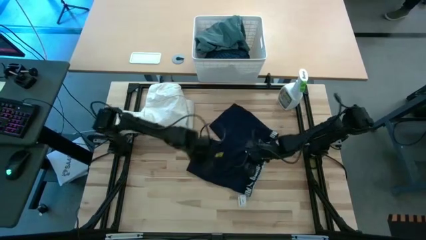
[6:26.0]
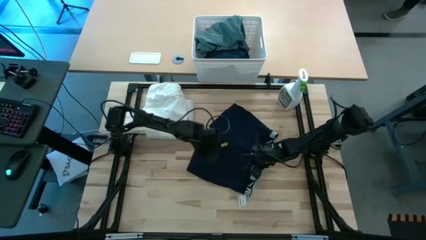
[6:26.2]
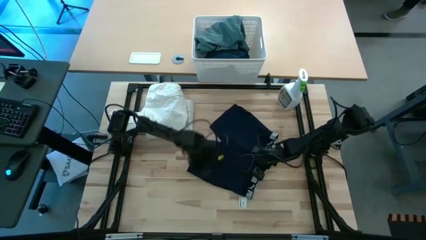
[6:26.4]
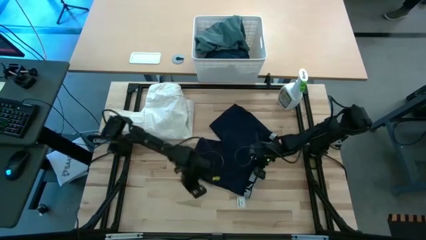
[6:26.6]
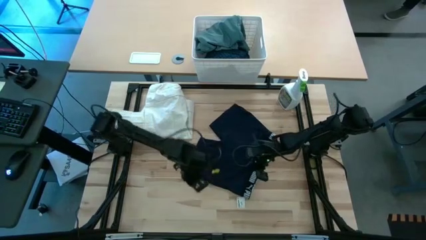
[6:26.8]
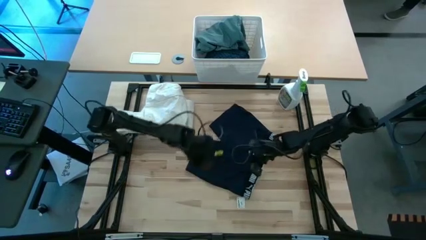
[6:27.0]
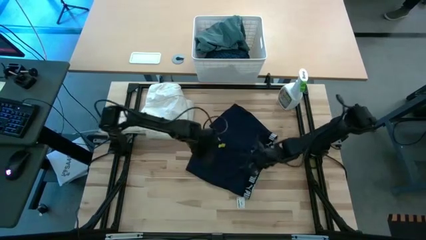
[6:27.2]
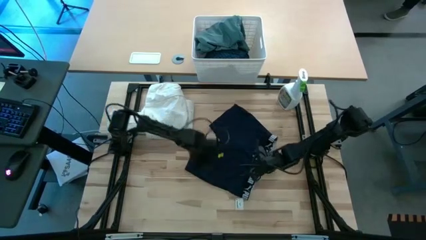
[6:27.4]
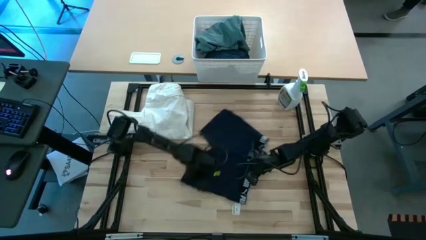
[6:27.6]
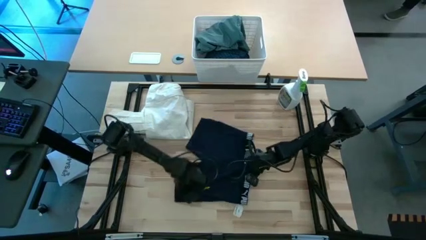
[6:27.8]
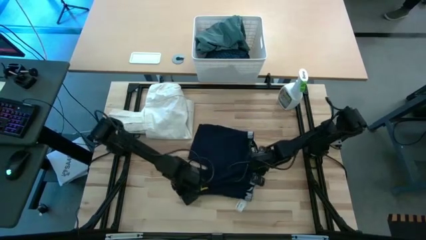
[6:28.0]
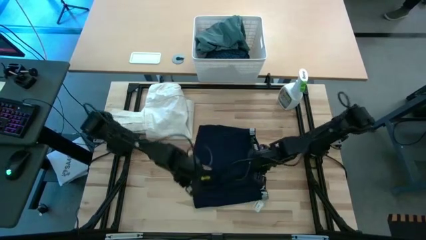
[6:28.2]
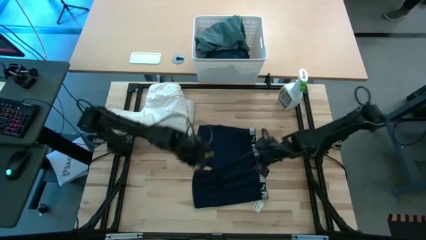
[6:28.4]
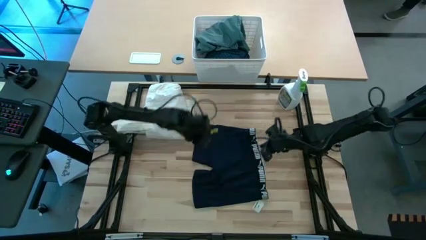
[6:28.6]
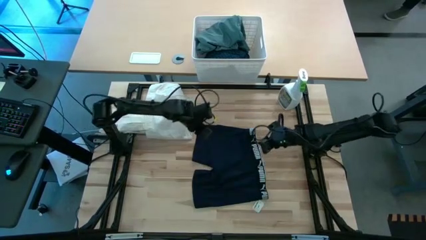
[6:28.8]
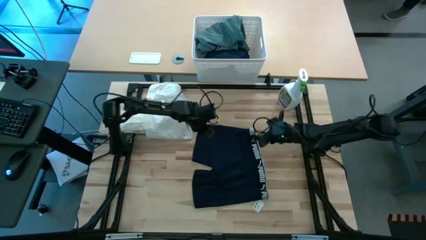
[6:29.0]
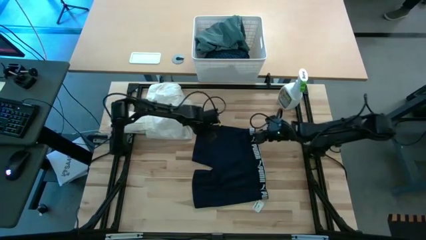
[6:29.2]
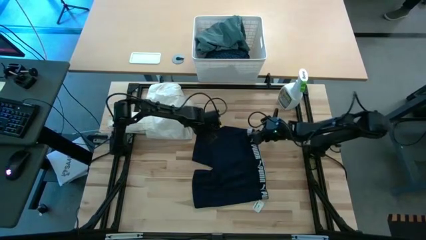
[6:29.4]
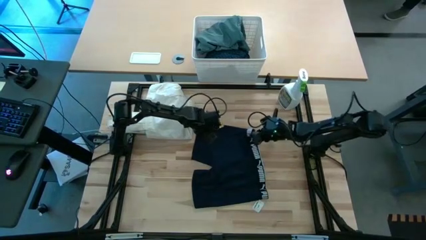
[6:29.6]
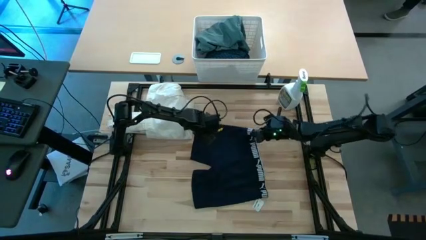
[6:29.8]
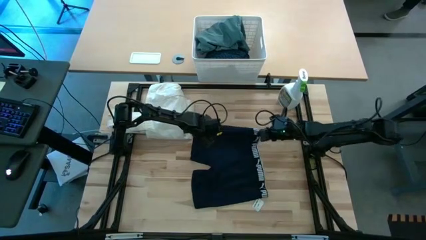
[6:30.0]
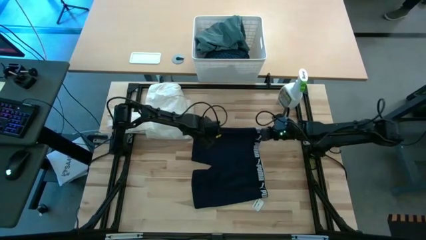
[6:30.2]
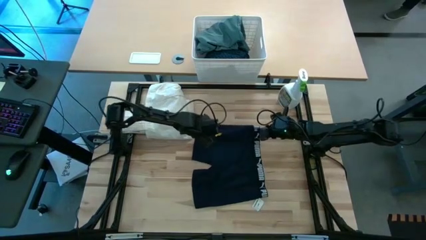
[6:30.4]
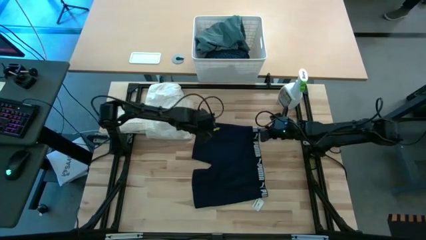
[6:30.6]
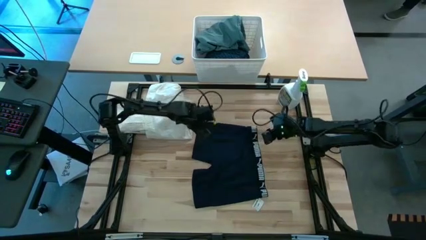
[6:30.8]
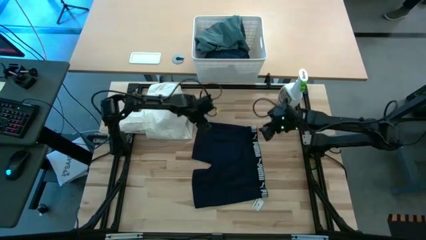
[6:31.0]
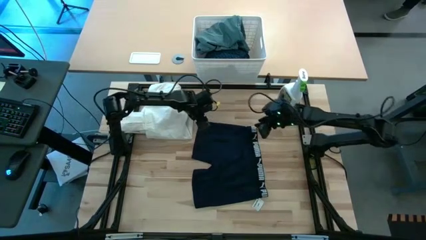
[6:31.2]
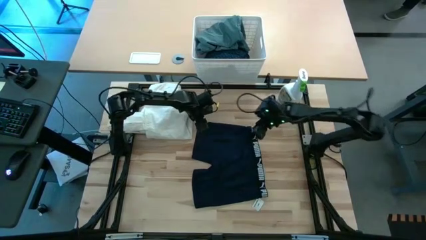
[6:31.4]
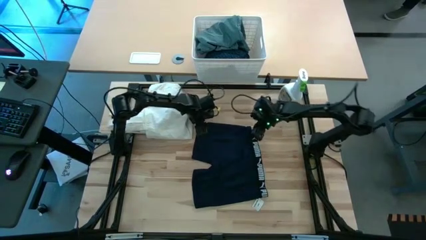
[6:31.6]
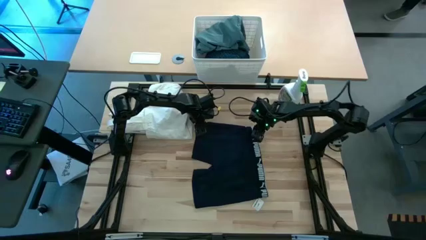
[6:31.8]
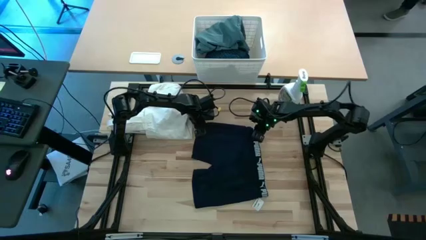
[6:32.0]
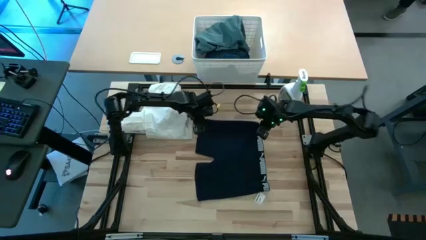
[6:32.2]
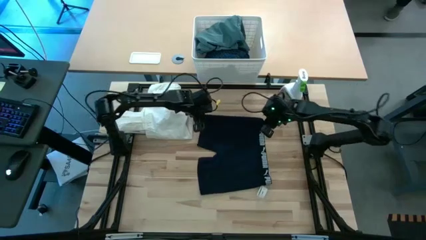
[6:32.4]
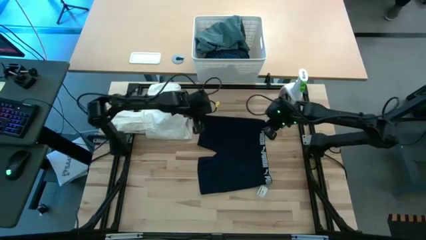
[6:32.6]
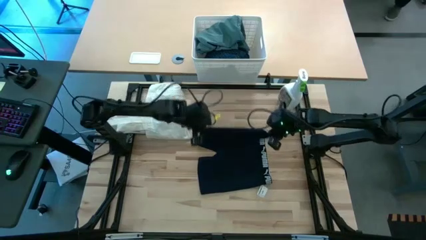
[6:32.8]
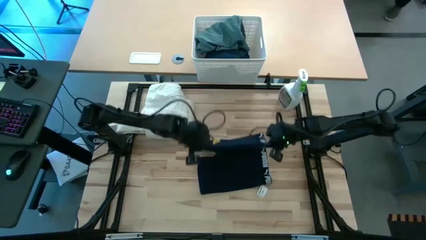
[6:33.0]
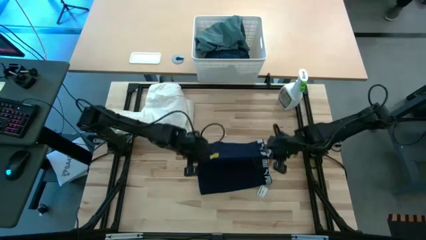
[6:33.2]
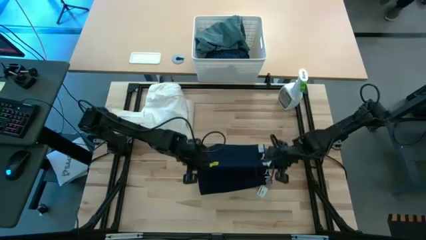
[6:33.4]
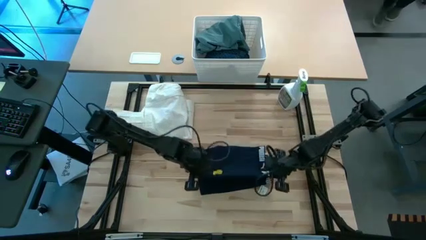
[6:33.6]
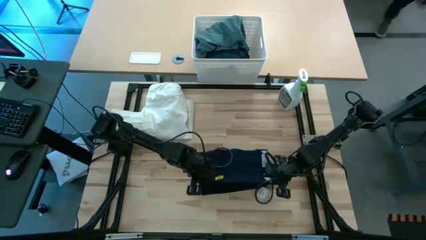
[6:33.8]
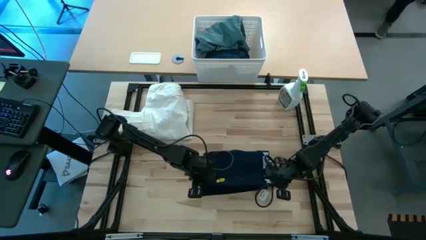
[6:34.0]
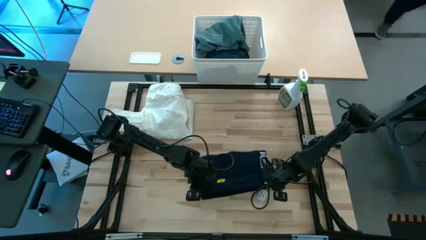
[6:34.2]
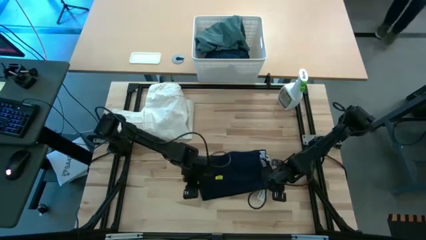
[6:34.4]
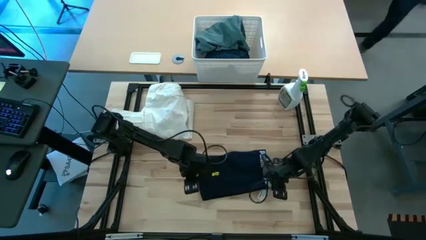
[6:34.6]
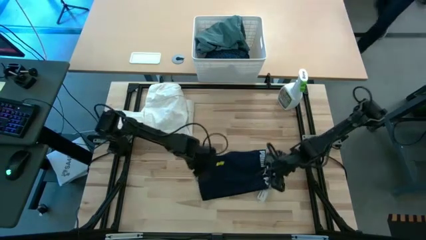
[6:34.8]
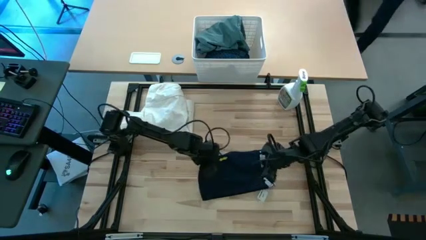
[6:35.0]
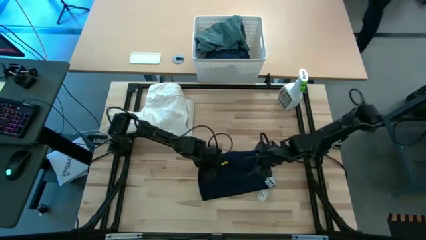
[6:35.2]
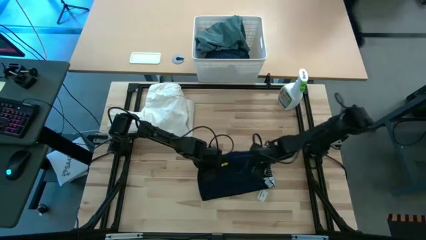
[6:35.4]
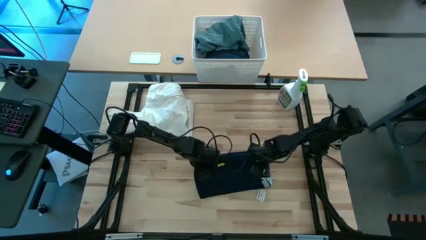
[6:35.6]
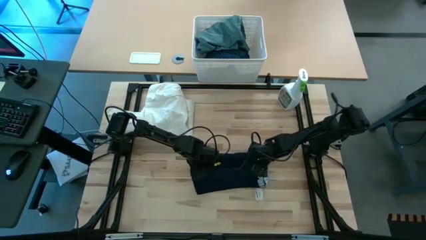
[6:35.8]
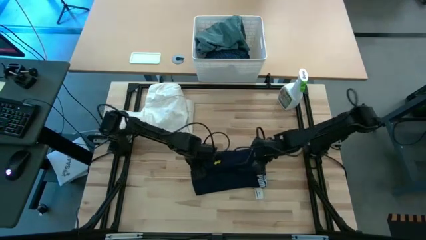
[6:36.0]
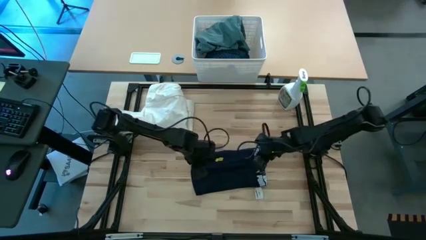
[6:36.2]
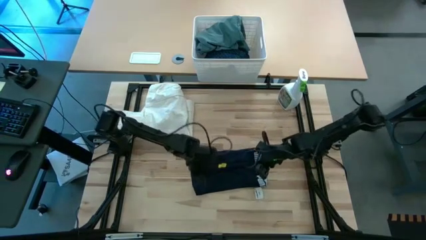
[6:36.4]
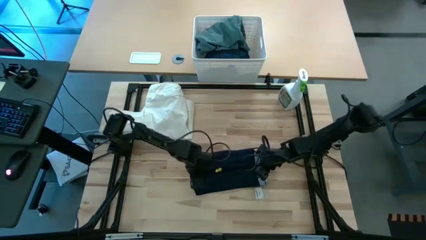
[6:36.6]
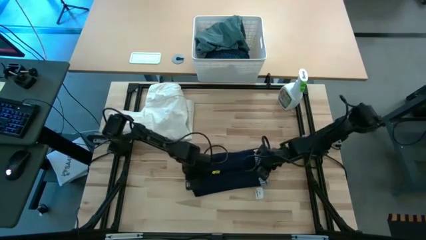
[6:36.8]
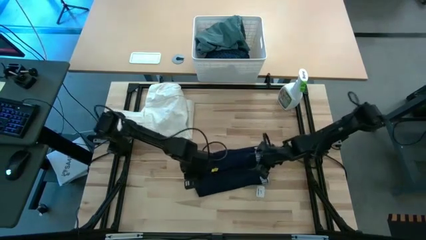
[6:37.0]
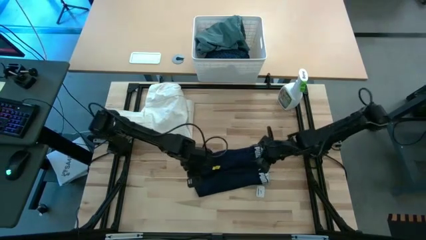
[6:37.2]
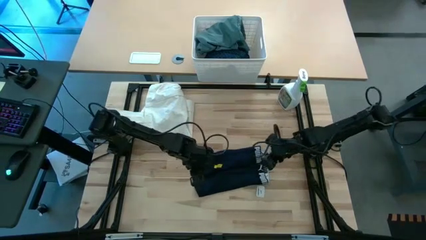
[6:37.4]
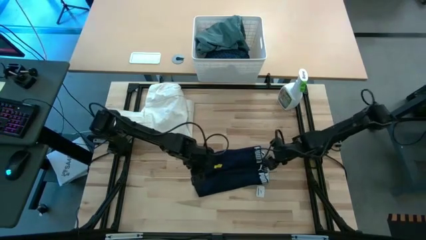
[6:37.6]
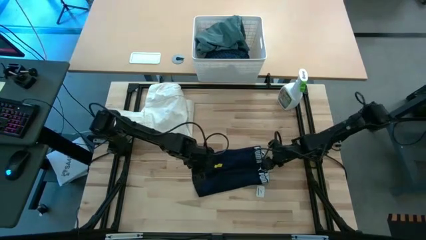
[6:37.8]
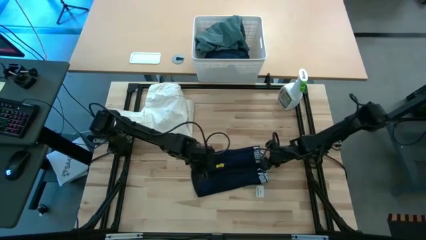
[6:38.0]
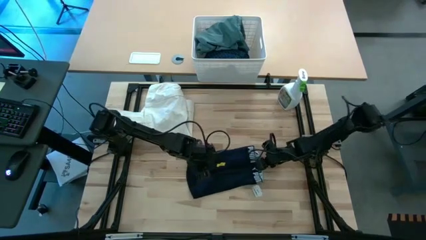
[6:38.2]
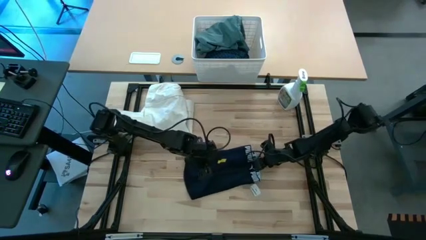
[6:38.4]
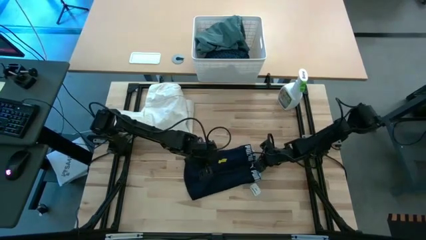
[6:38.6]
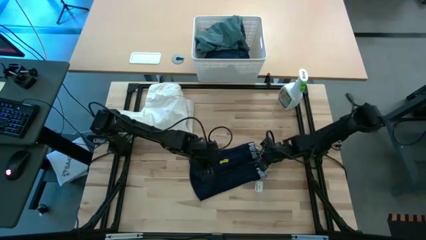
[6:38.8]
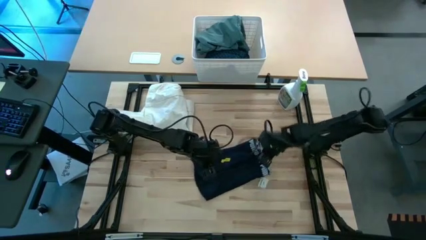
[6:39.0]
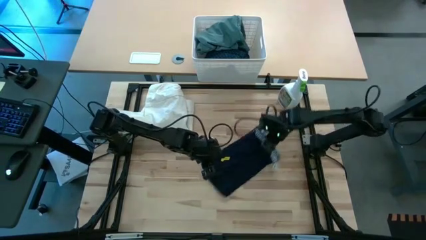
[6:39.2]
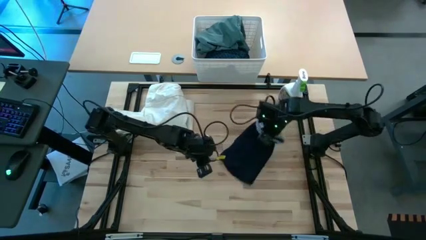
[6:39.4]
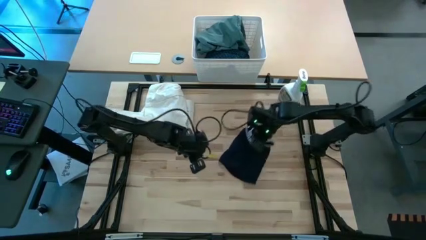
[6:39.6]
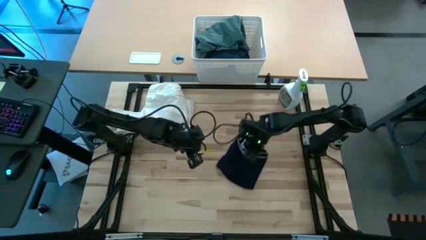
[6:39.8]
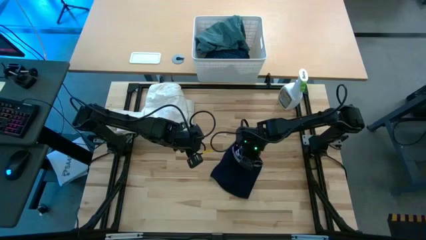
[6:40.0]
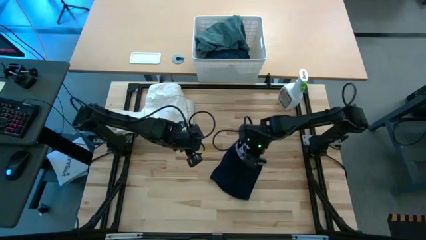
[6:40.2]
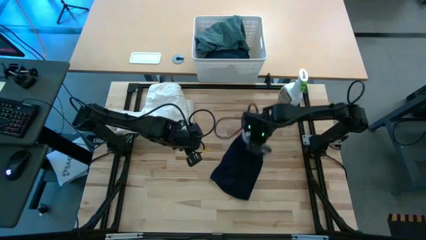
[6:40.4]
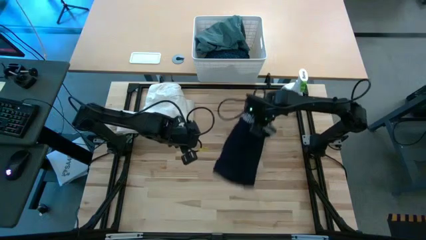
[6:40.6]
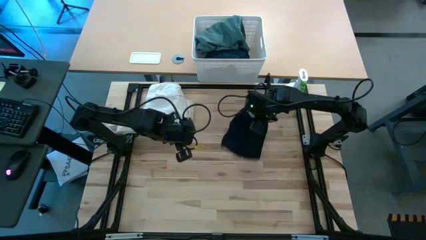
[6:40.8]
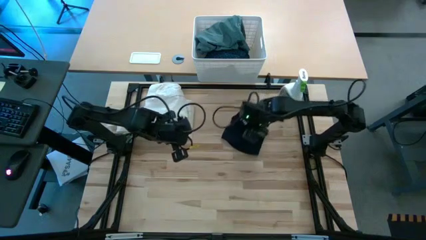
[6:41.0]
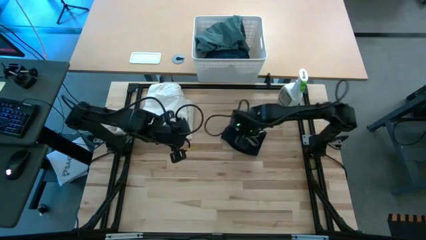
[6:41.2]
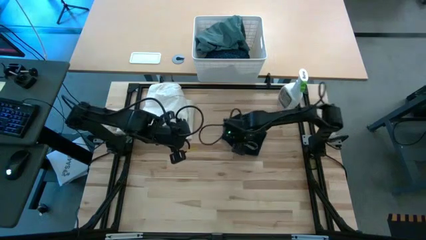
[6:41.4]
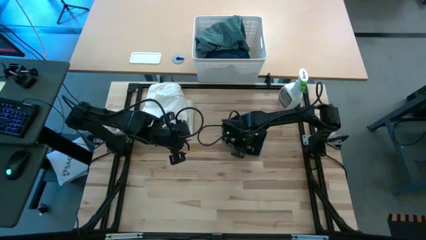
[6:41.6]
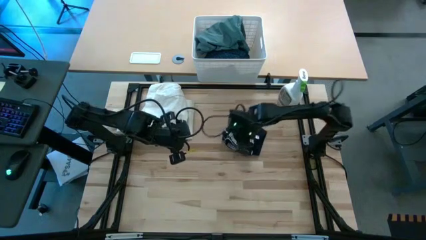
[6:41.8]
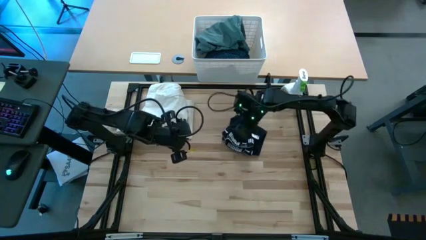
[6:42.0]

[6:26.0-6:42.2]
Fold the blue boxer short
